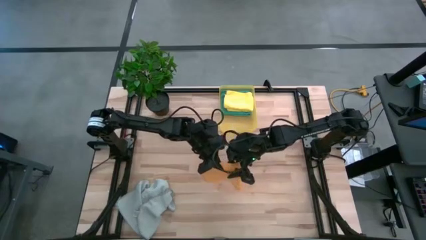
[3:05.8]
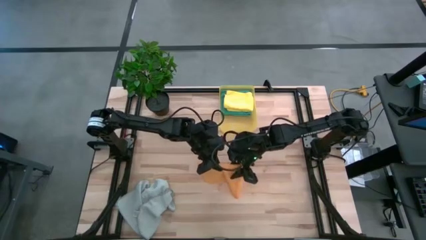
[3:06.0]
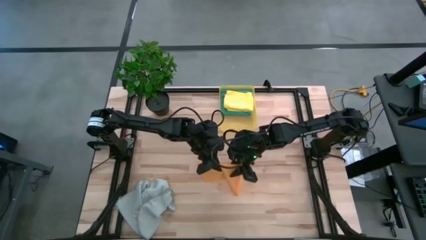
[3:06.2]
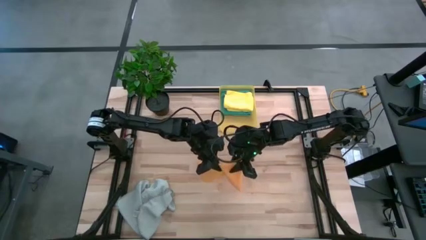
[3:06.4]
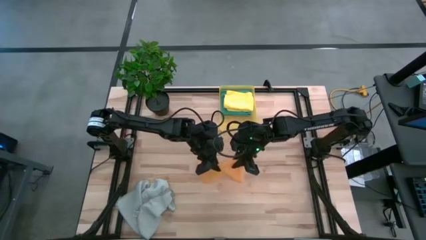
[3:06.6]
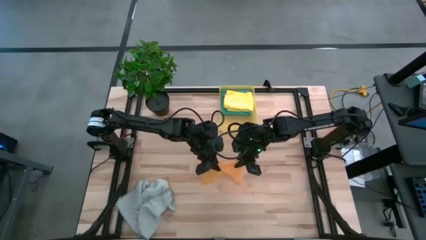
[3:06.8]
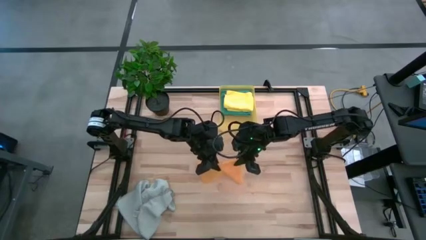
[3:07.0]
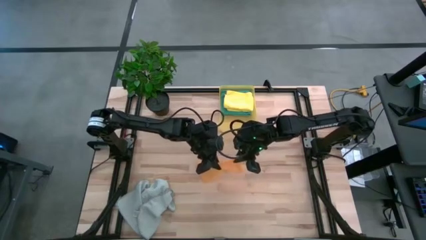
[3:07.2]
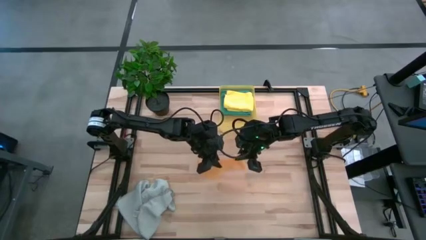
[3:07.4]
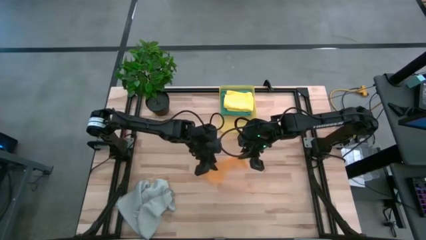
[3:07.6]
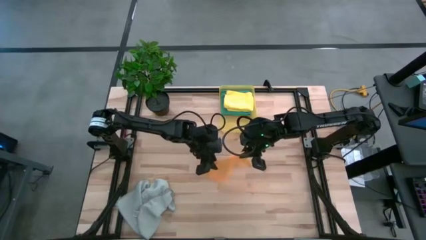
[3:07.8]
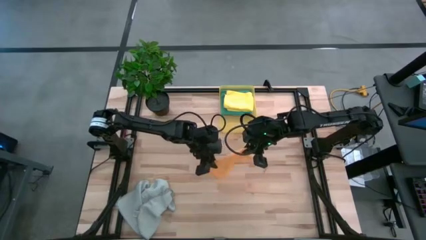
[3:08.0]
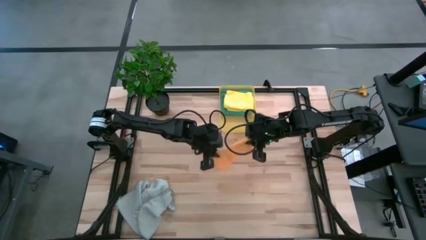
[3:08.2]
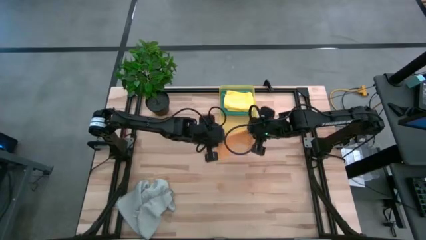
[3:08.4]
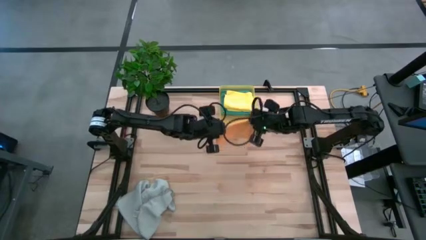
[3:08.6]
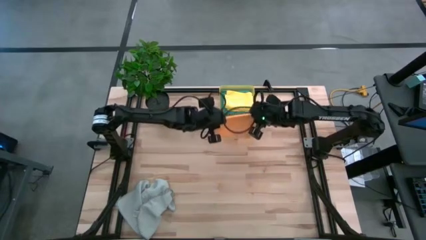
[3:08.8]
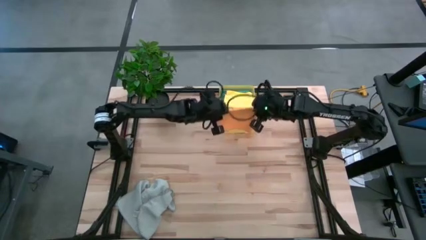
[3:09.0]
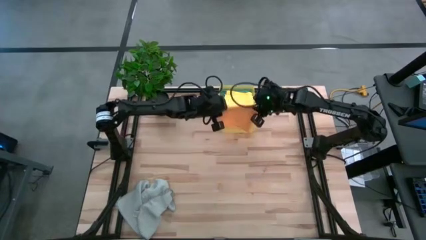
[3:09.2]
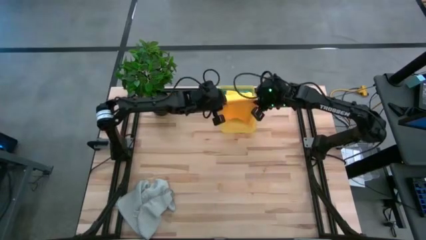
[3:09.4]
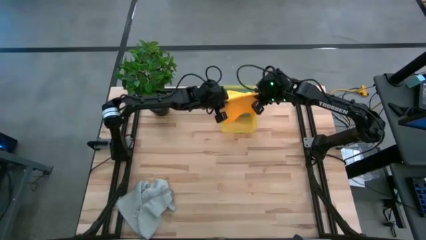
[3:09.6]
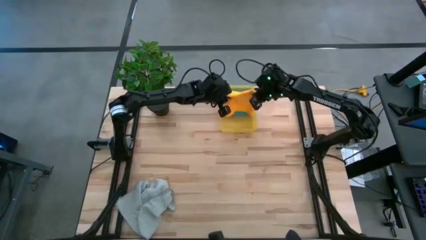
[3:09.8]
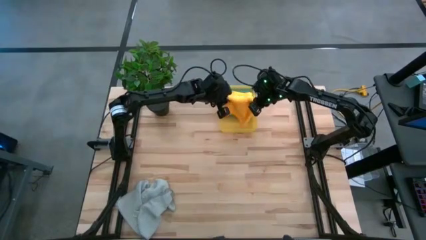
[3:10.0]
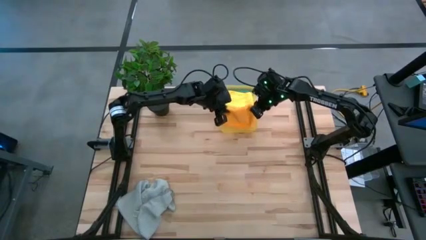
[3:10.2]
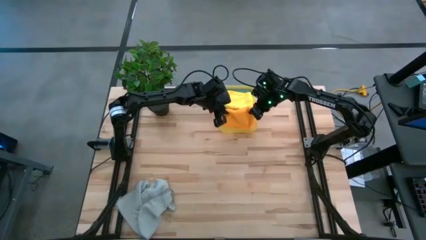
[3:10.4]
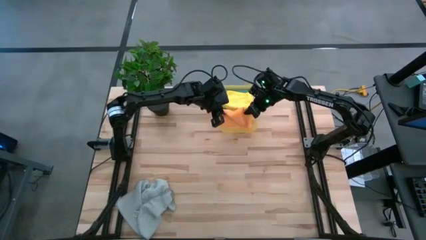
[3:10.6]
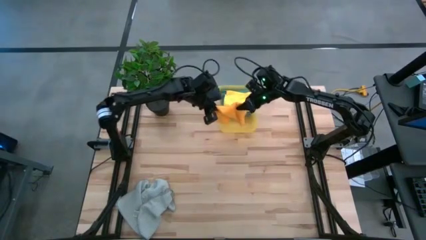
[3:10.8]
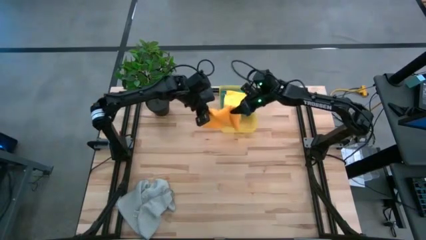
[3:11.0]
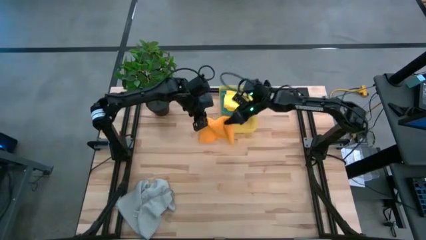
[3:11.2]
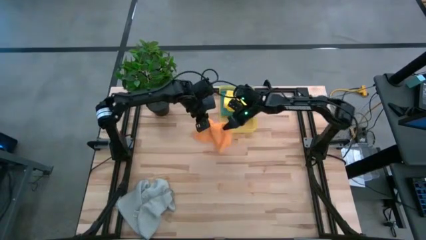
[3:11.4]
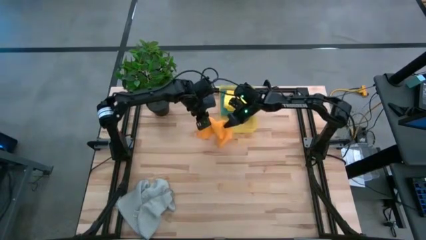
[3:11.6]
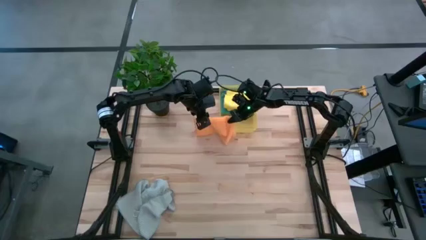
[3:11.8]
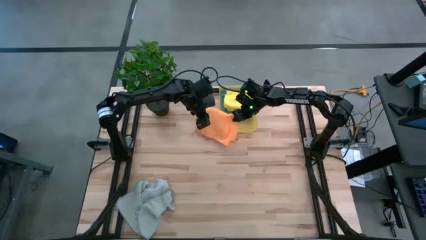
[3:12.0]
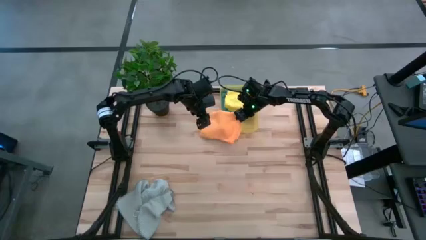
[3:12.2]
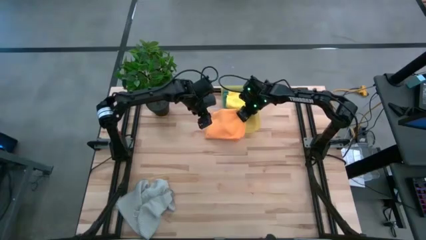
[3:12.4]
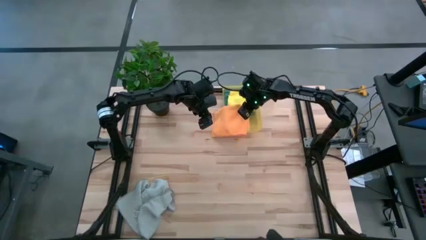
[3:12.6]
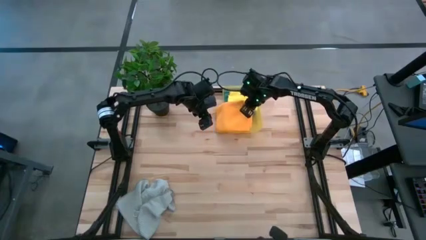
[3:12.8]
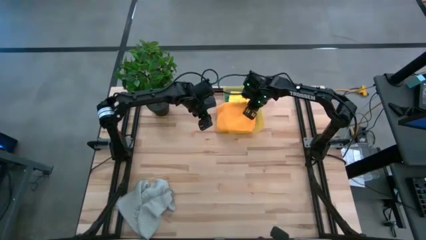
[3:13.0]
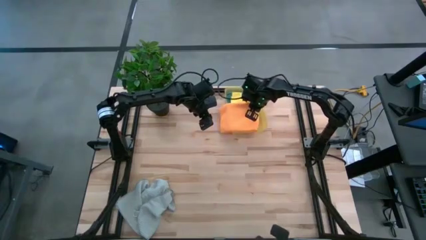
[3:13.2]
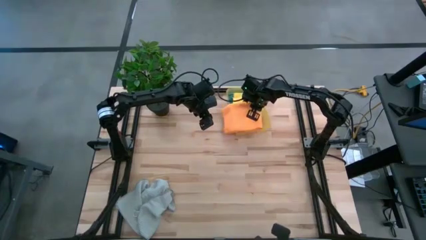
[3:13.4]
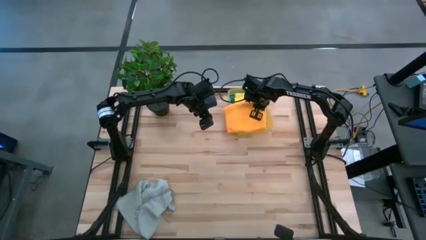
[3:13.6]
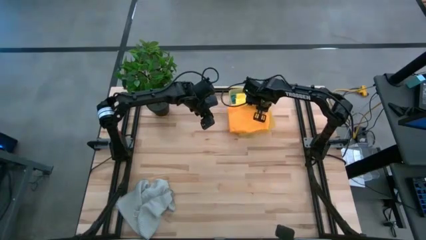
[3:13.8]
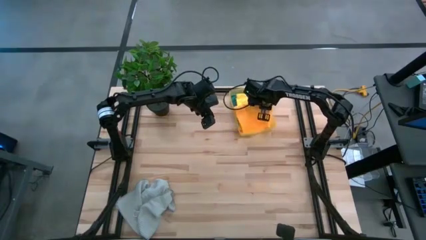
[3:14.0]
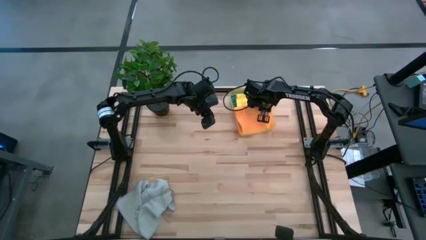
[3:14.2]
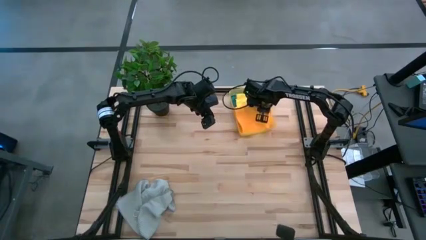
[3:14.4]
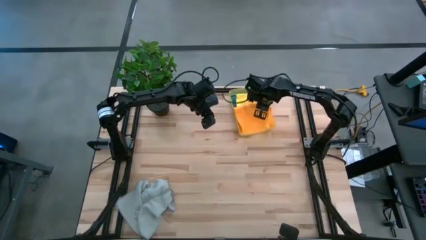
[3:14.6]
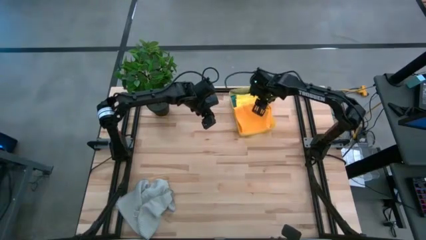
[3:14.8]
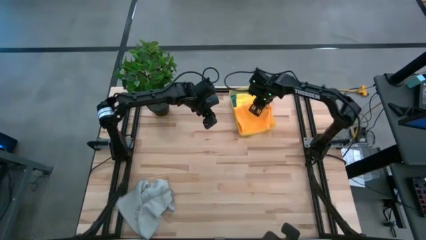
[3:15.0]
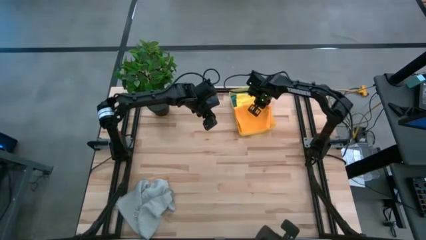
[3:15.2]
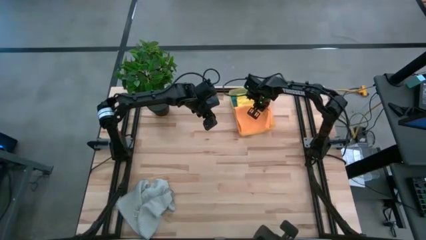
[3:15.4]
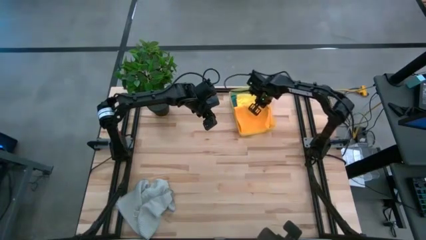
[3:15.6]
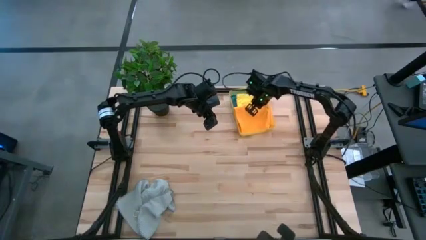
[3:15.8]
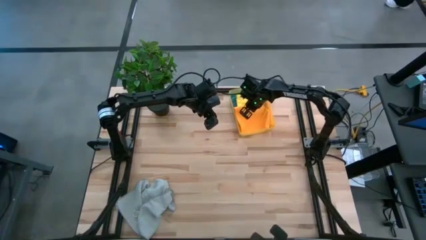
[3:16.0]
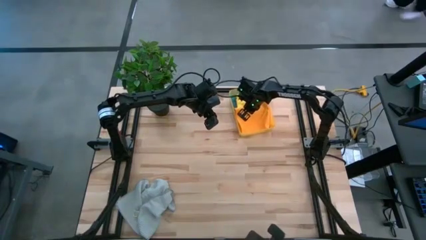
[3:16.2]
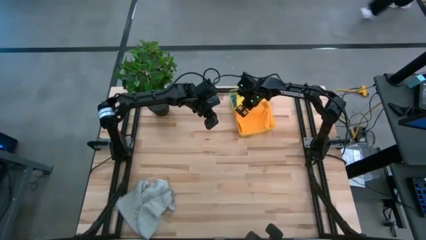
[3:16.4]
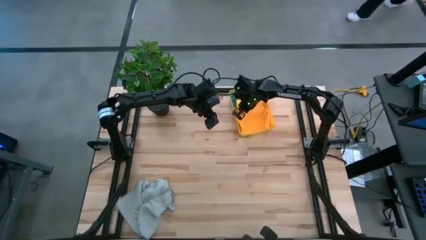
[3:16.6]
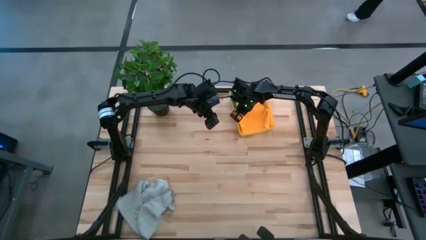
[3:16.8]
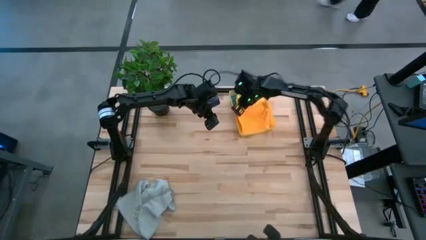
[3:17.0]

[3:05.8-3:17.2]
Task: Fold microfiber towels
Put the orange microfiber towel into the yellow bin

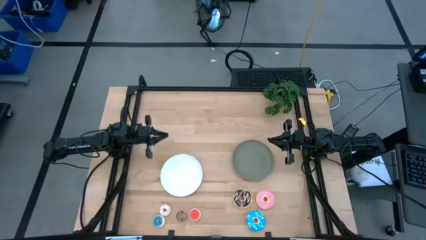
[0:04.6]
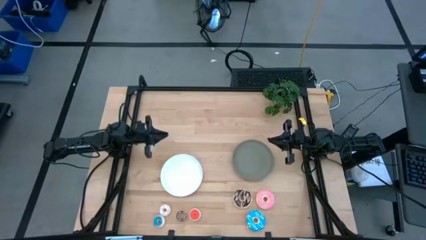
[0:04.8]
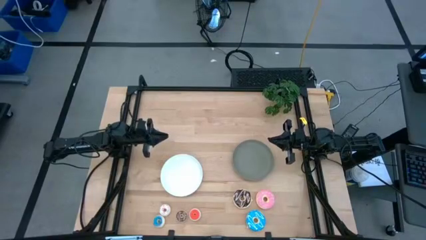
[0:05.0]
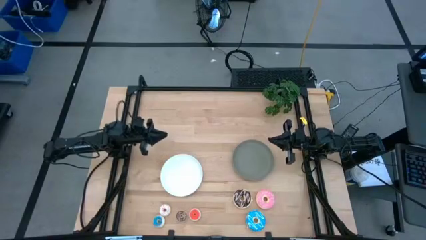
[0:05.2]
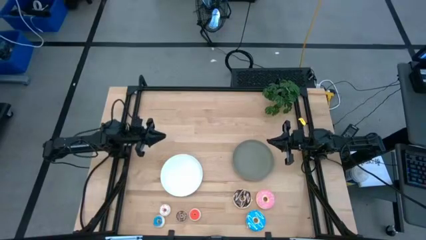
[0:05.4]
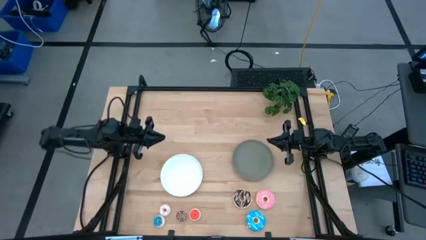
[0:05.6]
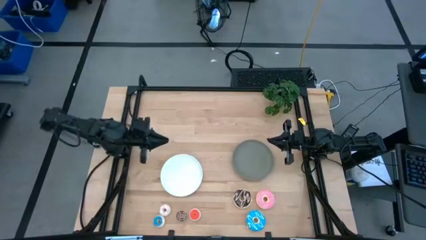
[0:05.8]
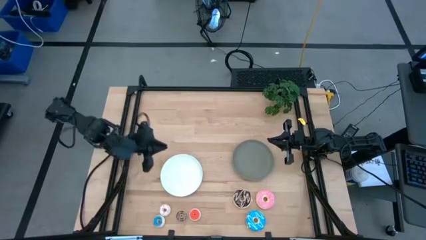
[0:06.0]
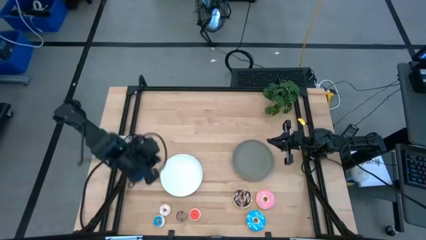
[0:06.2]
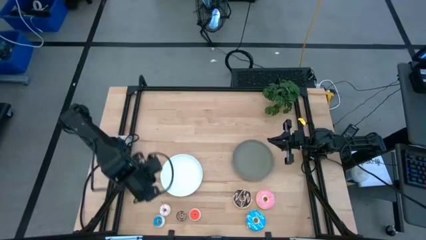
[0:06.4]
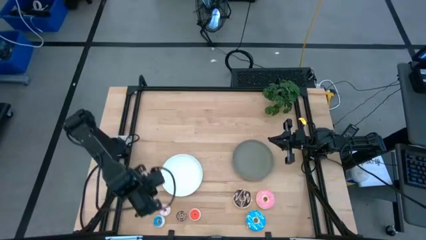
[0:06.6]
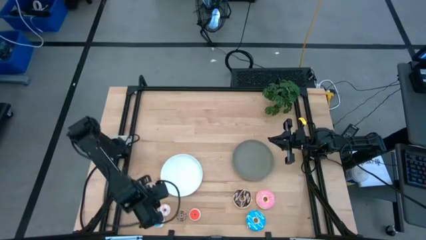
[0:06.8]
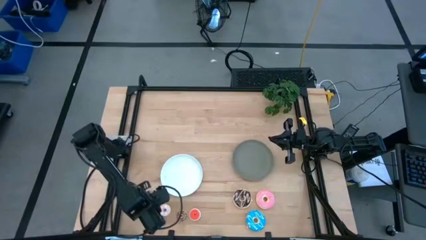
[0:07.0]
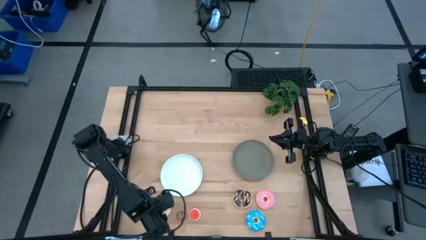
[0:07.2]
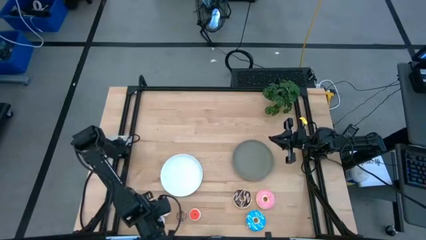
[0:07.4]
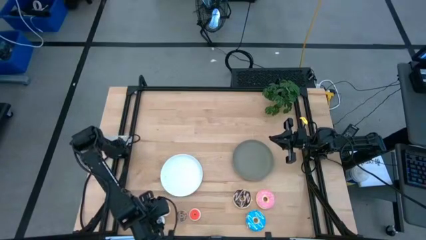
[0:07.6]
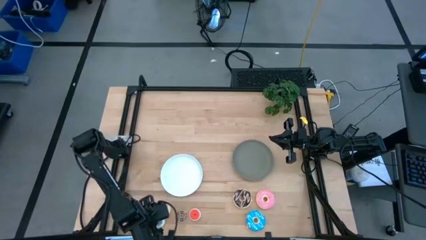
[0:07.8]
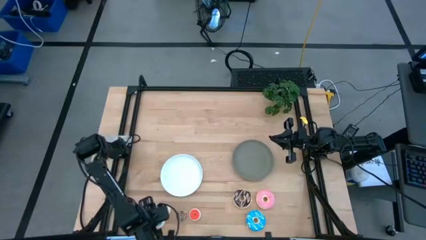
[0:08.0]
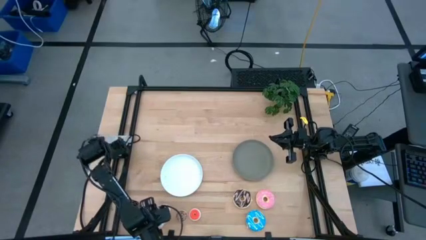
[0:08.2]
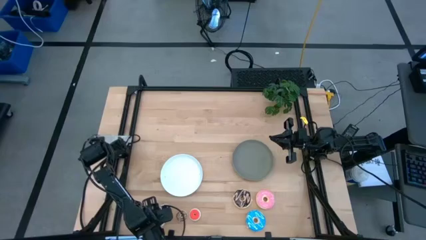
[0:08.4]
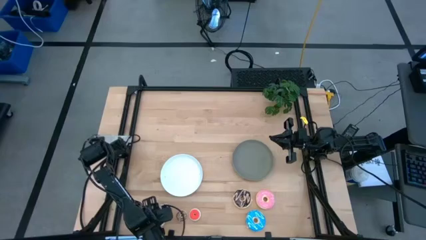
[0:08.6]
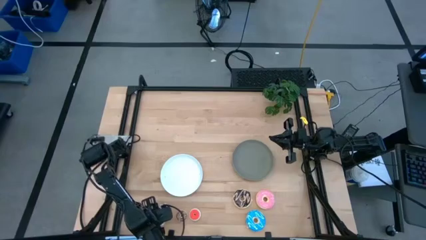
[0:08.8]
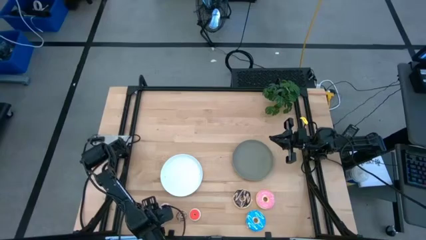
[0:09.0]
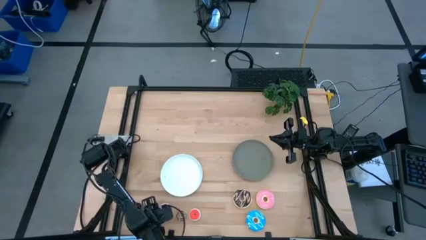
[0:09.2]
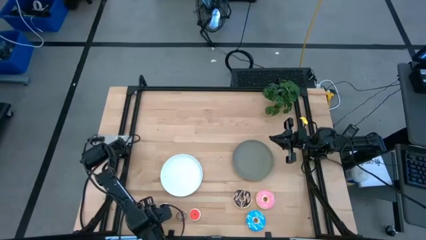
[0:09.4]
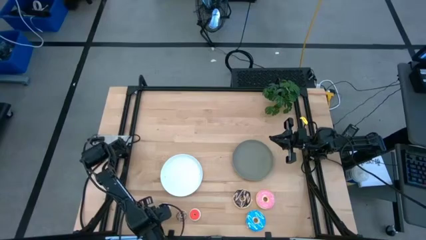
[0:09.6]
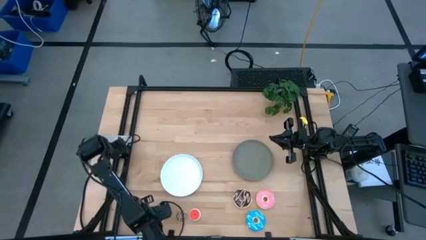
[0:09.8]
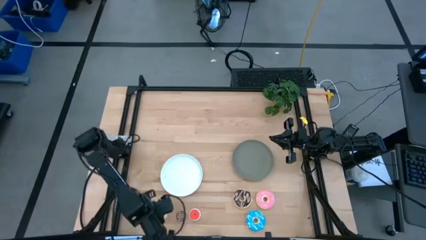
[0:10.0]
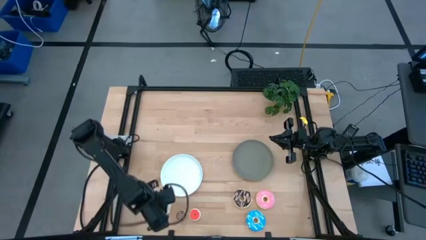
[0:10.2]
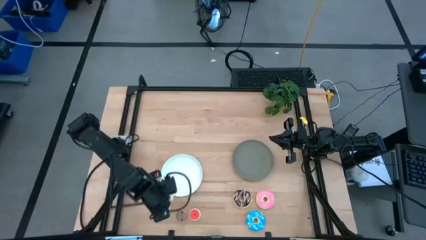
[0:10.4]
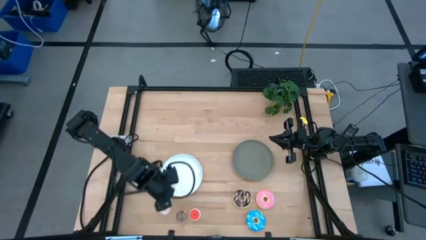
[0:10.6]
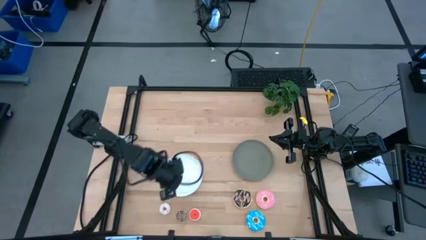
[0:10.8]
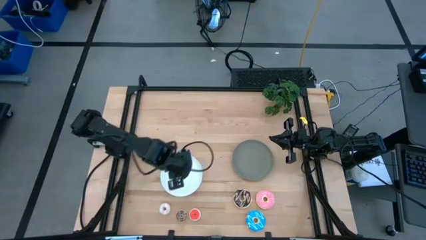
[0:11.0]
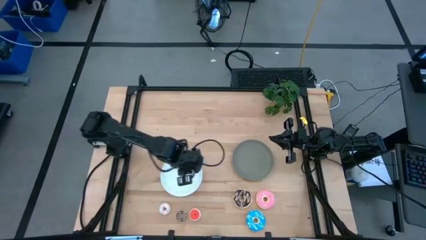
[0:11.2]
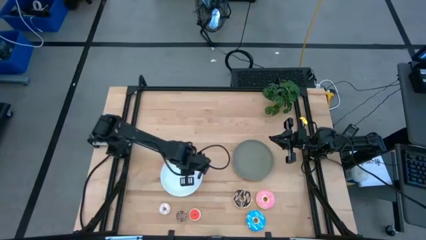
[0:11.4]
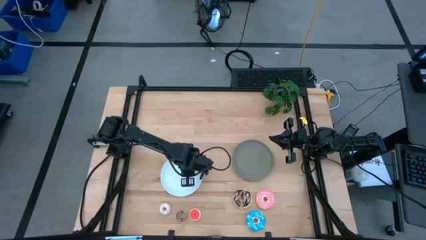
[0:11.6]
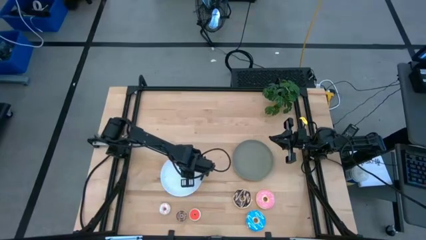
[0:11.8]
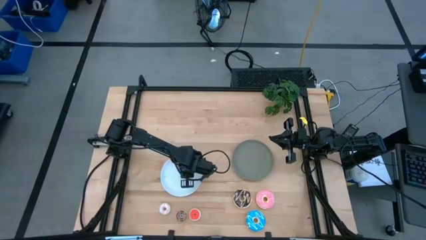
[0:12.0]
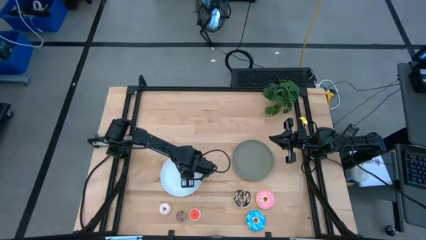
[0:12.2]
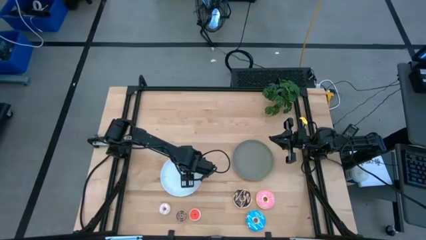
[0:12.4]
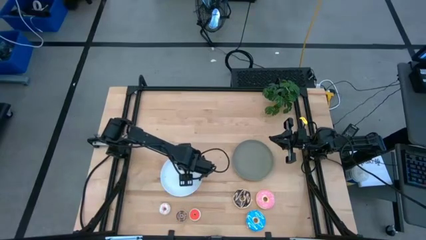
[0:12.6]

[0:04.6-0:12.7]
Task: Pick & Place donuts
Put the small blue donut on the white plate
